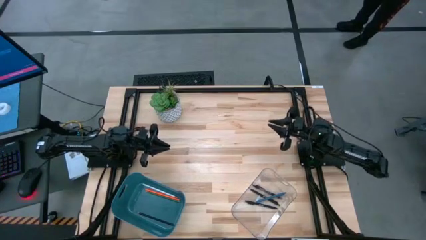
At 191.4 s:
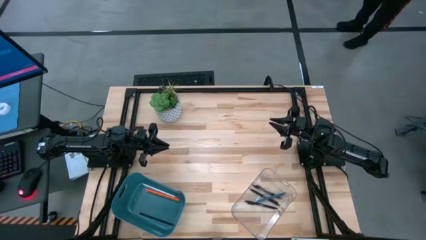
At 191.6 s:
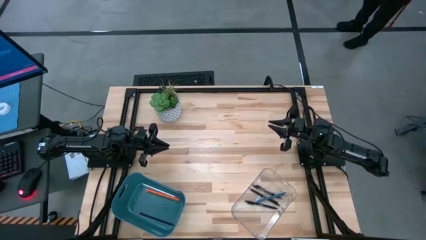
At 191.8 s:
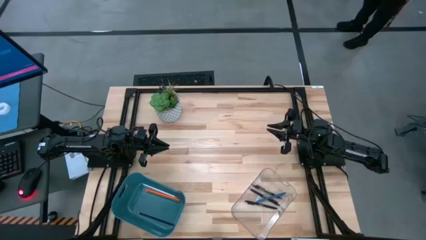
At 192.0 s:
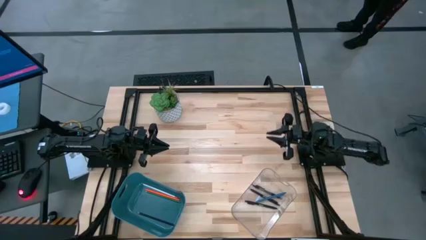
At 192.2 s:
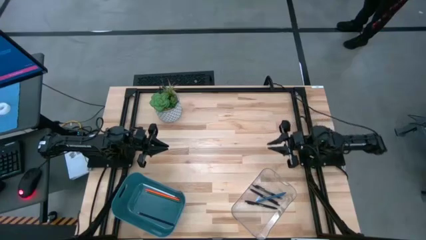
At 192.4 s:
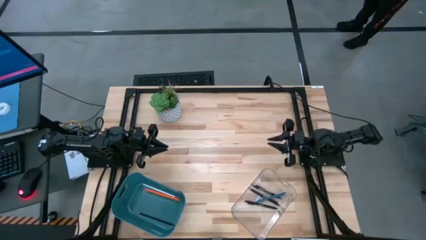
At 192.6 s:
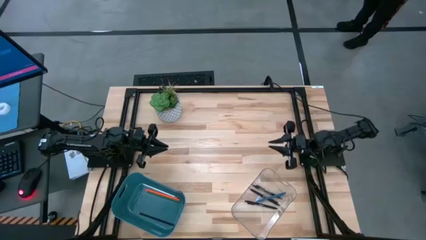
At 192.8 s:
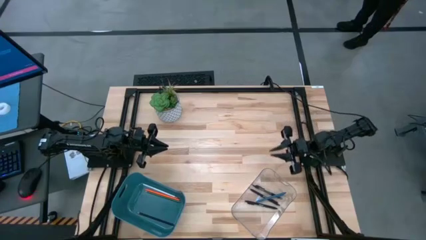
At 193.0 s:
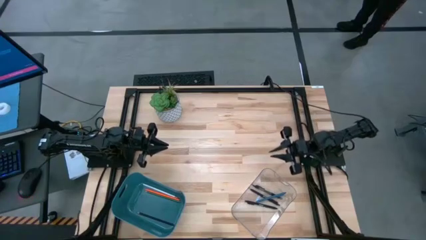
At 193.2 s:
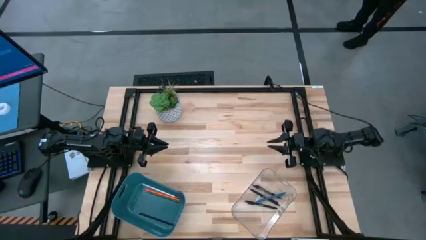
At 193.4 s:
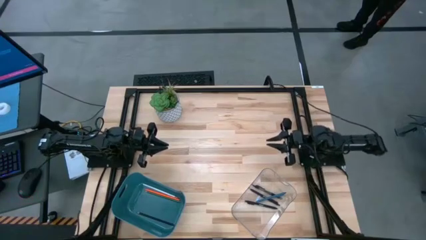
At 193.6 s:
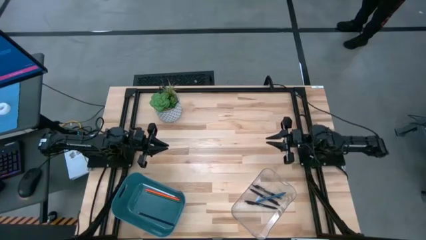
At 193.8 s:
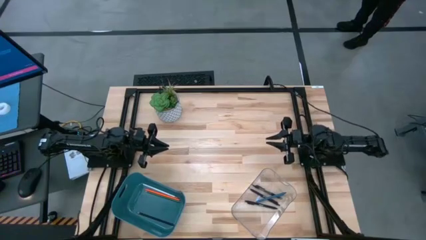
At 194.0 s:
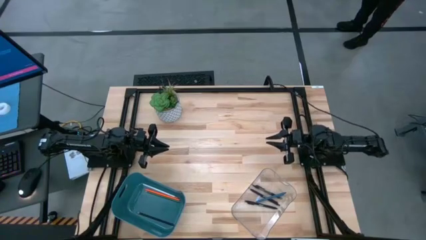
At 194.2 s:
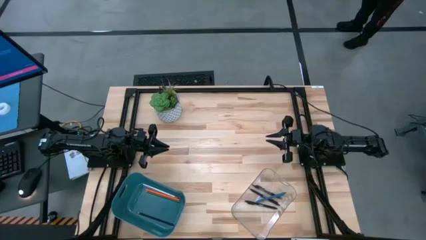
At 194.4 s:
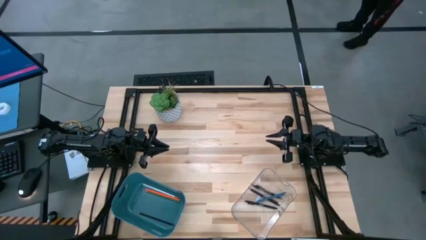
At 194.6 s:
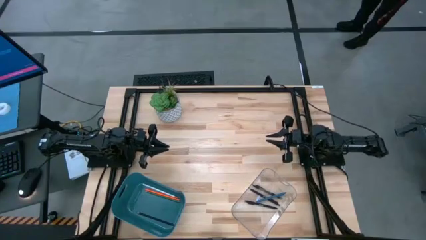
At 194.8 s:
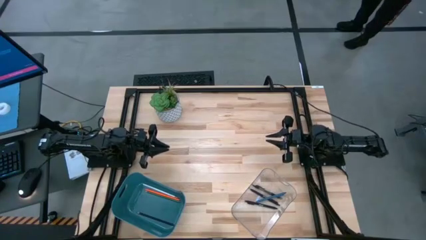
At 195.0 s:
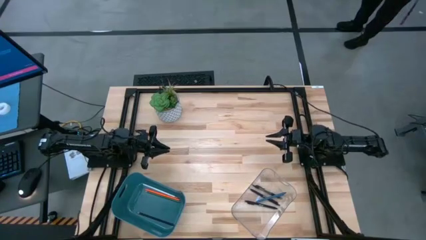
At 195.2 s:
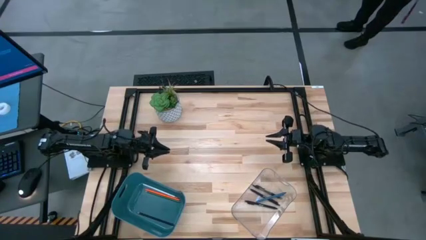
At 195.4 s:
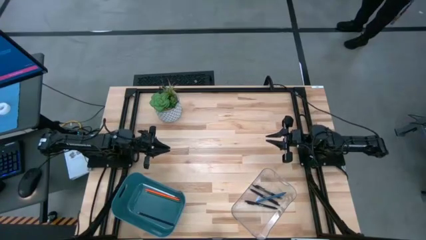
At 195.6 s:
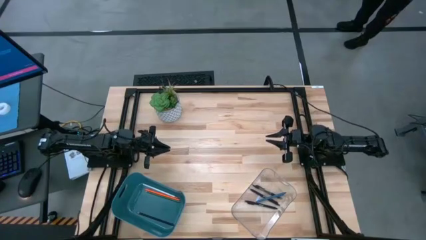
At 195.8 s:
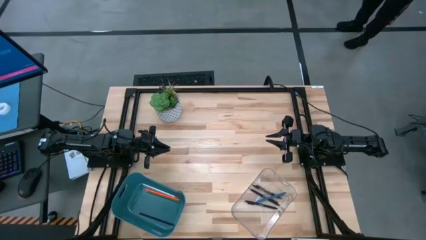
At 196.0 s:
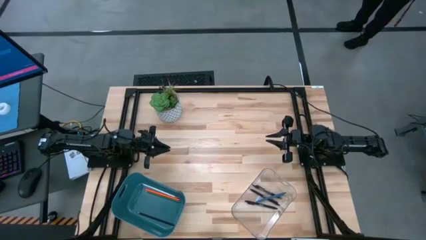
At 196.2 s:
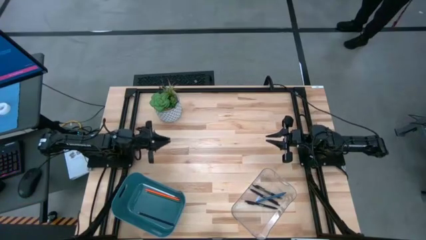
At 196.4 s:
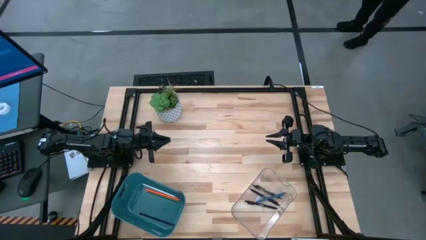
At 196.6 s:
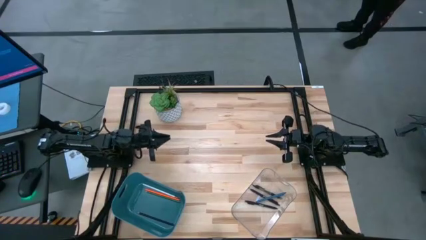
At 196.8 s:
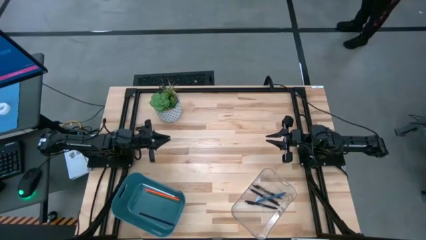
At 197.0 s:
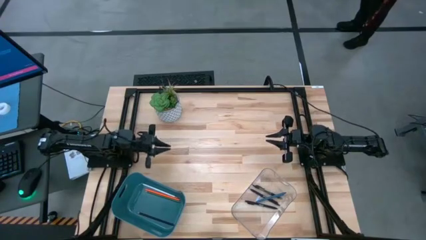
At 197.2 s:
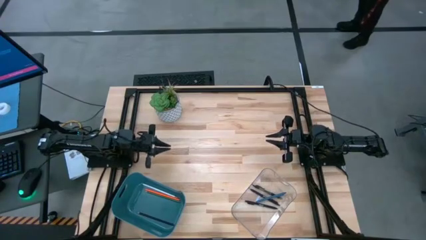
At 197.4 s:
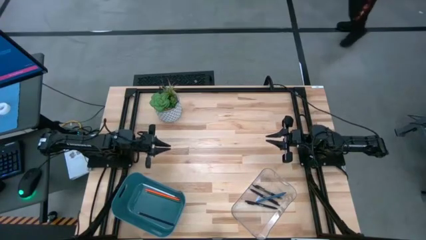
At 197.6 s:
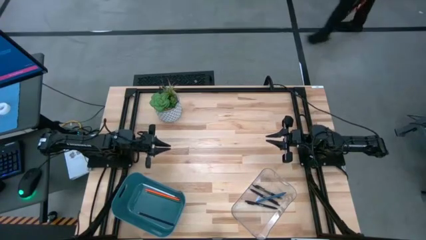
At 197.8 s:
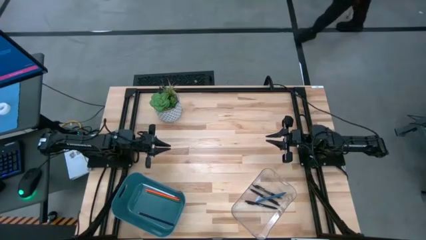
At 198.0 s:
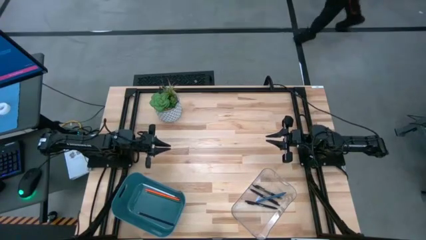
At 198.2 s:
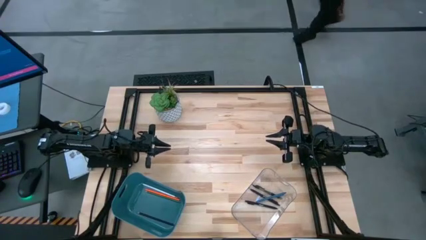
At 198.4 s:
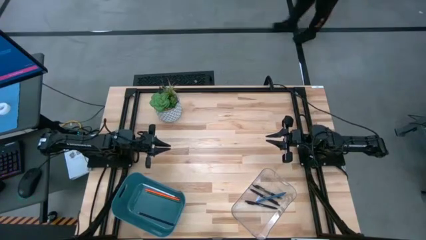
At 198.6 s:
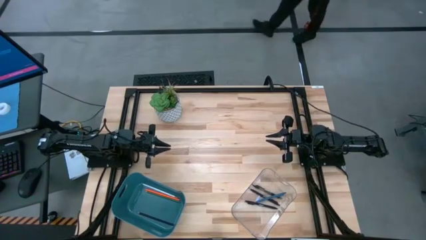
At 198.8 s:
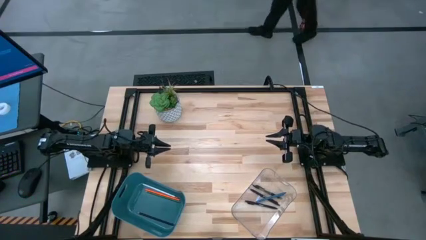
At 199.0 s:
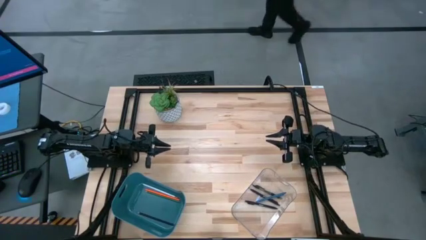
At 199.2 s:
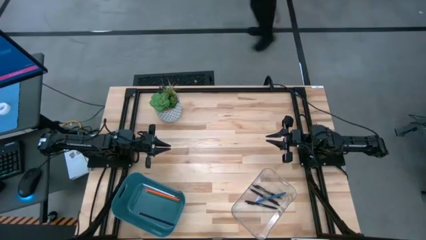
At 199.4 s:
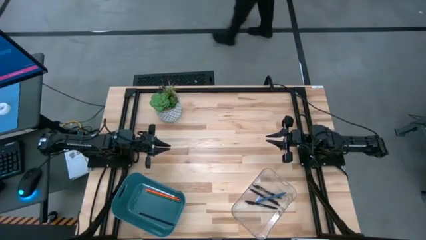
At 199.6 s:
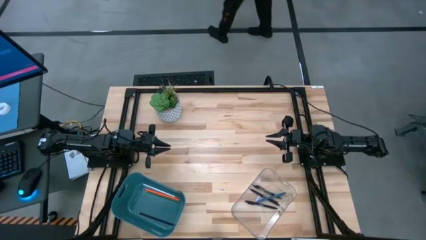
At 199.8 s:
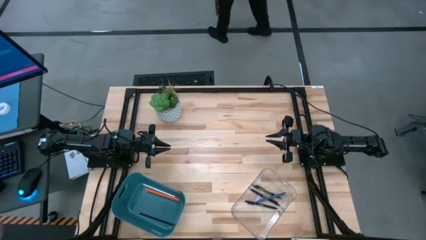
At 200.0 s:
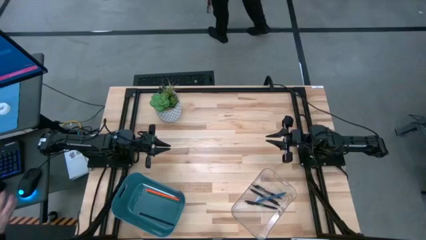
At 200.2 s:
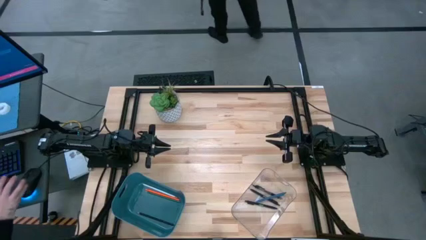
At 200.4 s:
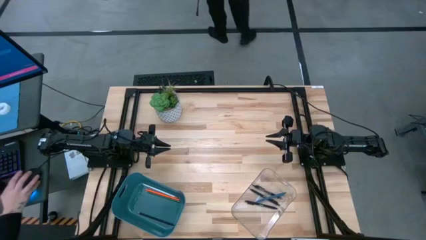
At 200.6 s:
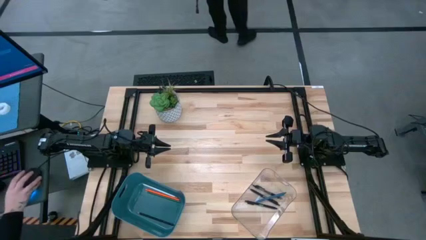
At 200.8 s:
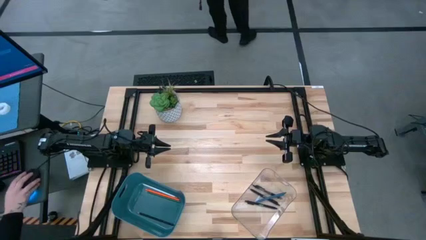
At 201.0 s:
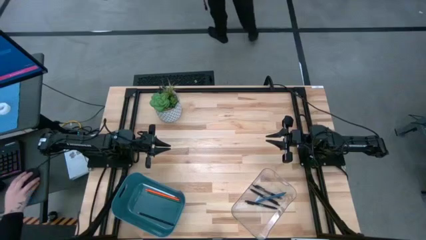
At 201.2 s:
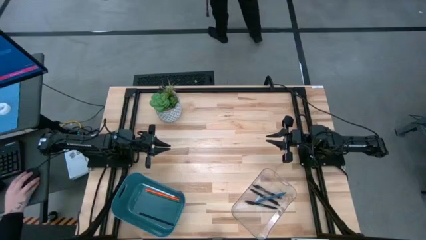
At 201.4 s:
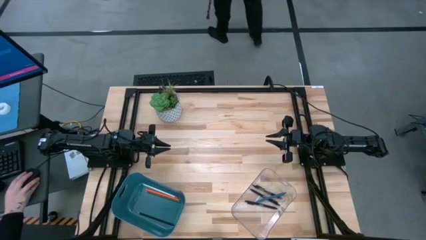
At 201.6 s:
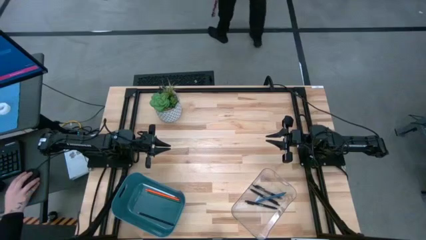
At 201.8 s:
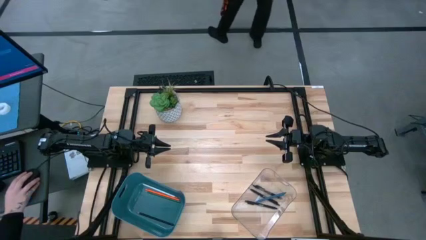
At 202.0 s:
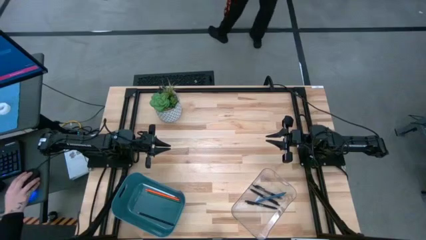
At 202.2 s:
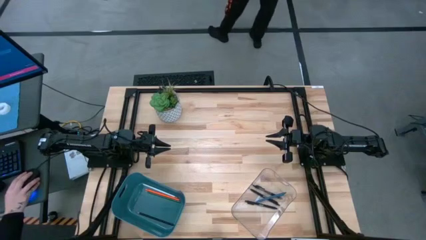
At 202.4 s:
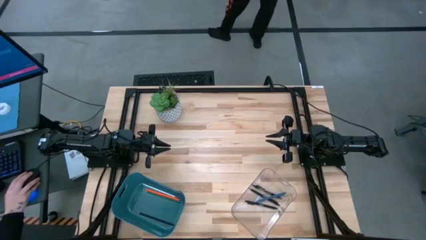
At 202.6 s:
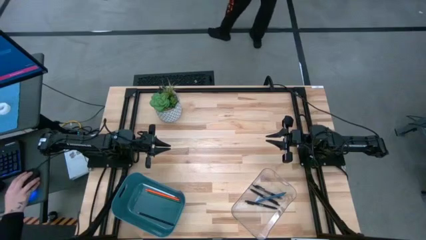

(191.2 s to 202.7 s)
Task: Sort pens & pencils
Return to Home Position
